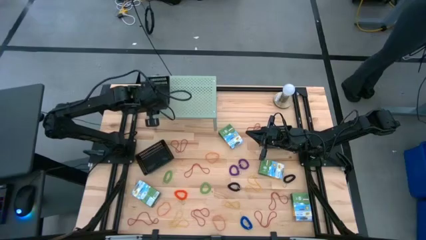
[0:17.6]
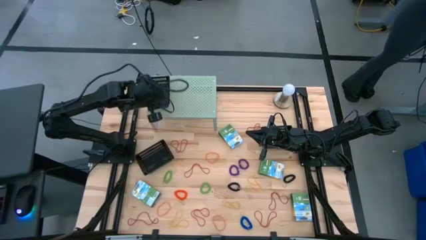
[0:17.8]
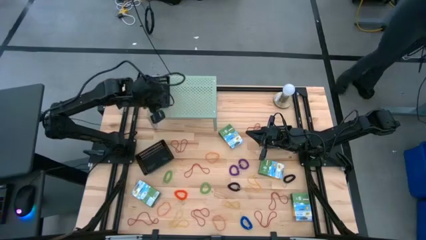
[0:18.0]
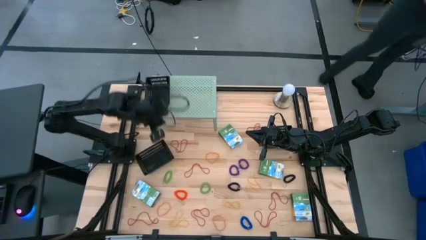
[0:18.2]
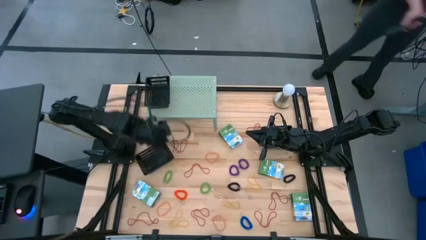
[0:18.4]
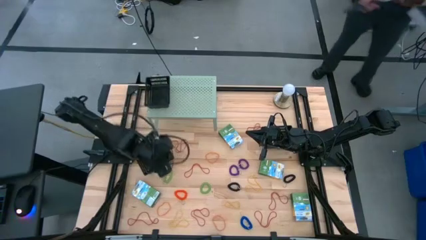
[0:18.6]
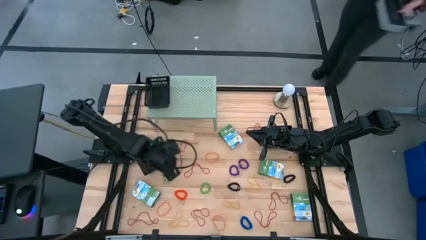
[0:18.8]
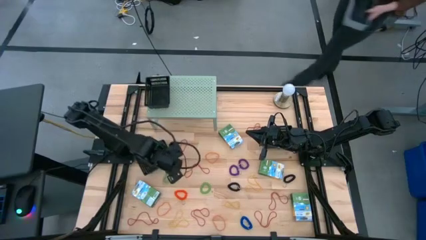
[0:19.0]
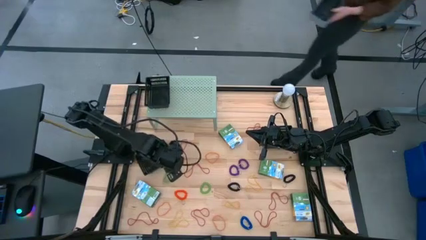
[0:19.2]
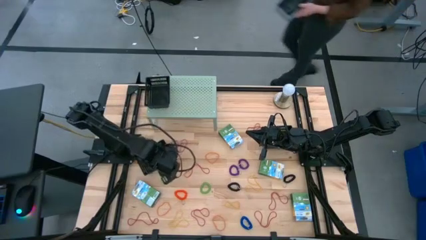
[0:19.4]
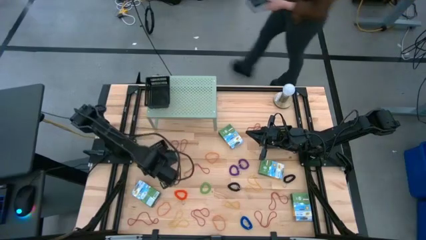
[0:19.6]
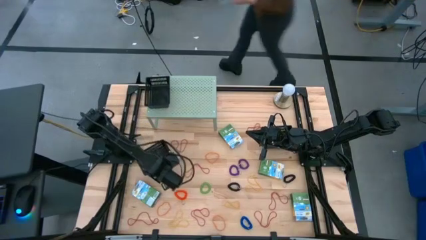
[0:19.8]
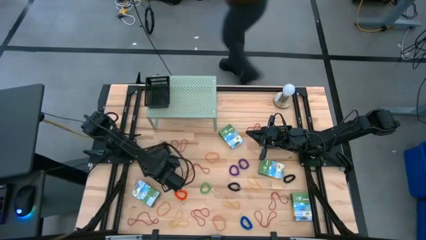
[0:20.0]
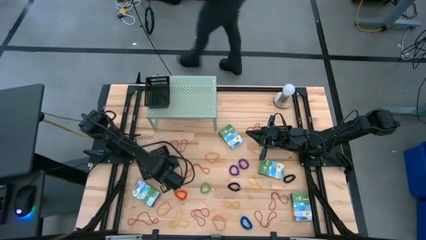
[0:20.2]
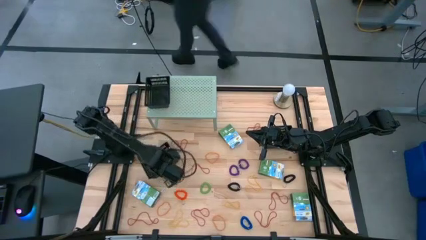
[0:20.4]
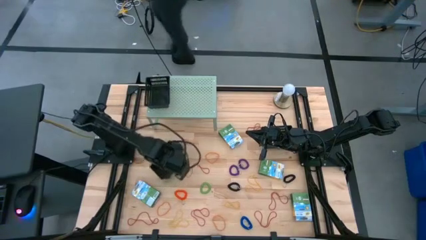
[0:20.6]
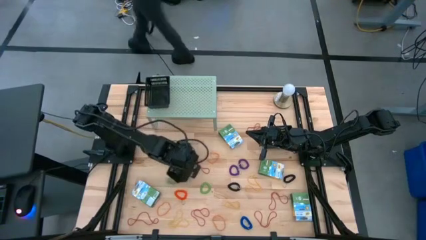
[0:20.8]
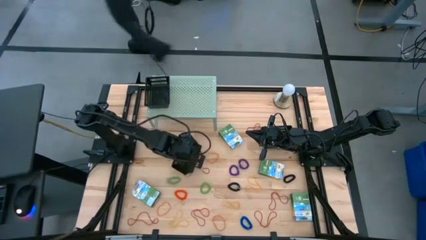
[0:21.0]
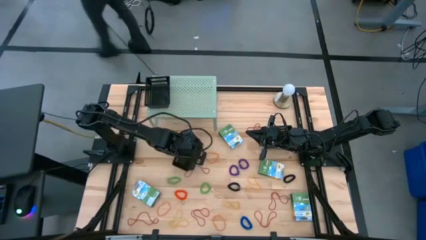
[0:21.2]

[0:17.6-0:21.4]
Task: Pick & Place Office Desk Supplies
Put the black bin on the shelf

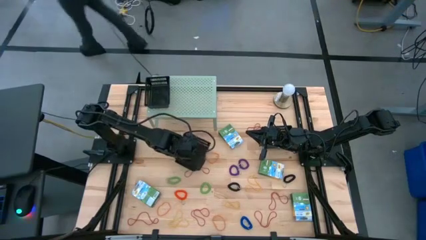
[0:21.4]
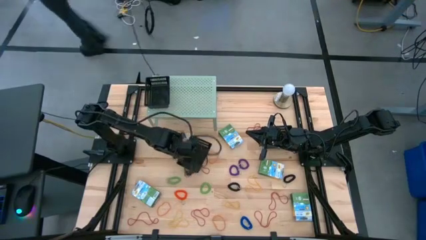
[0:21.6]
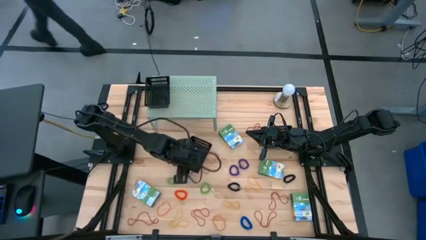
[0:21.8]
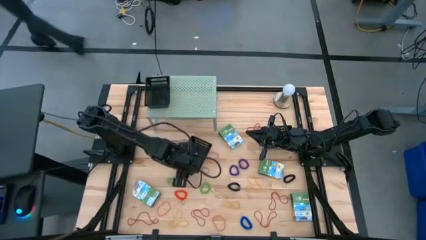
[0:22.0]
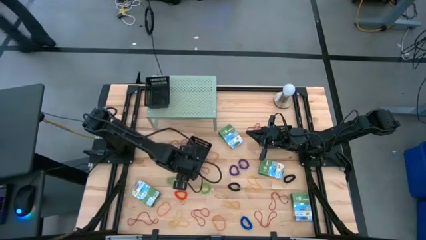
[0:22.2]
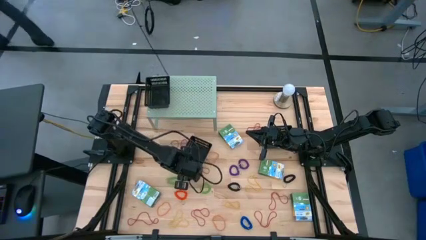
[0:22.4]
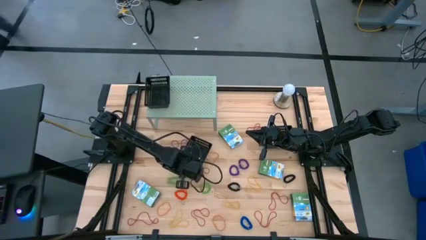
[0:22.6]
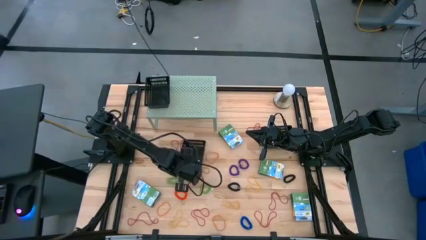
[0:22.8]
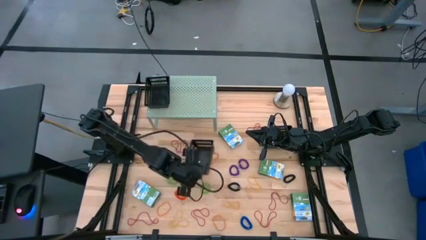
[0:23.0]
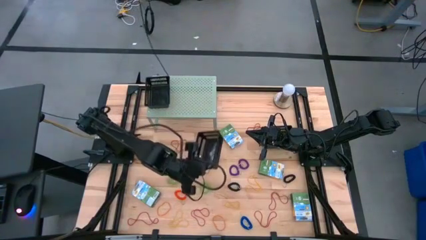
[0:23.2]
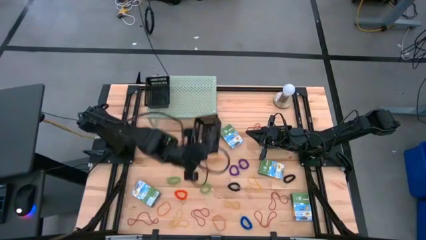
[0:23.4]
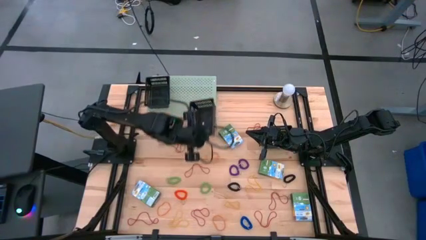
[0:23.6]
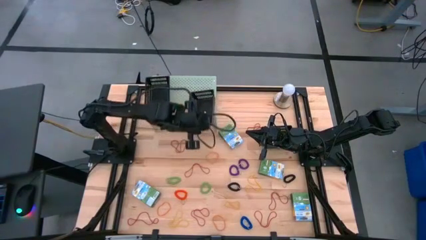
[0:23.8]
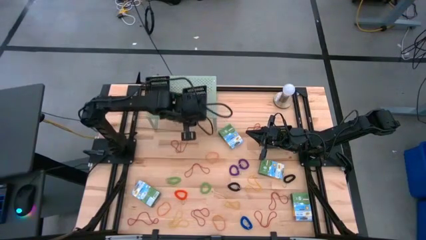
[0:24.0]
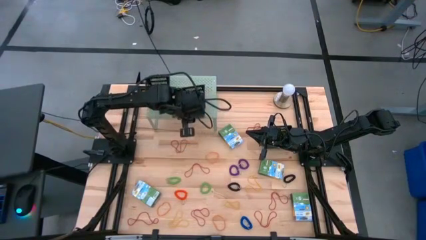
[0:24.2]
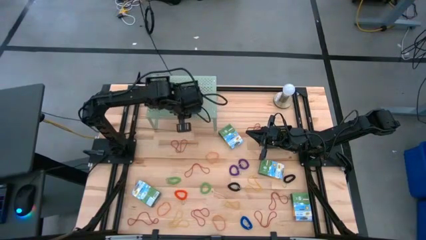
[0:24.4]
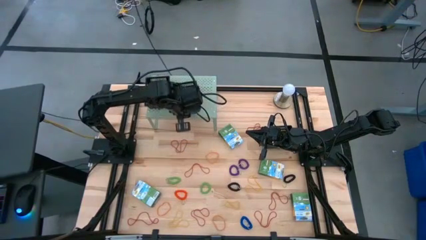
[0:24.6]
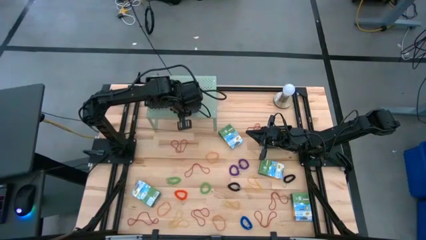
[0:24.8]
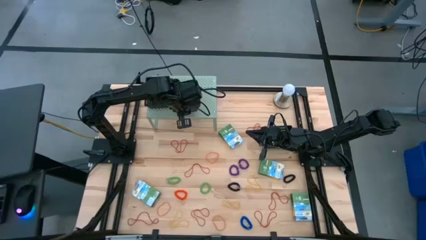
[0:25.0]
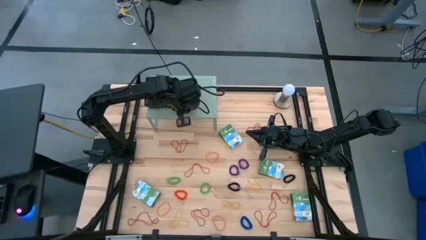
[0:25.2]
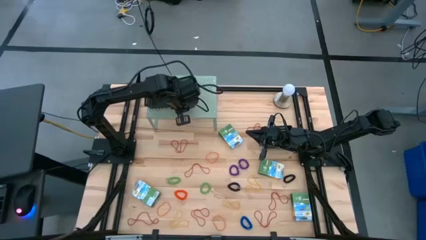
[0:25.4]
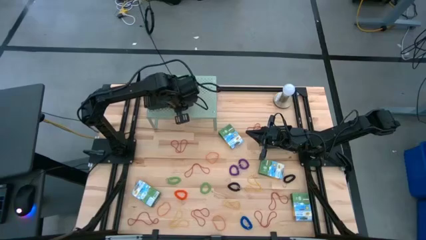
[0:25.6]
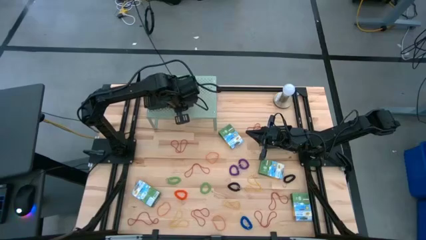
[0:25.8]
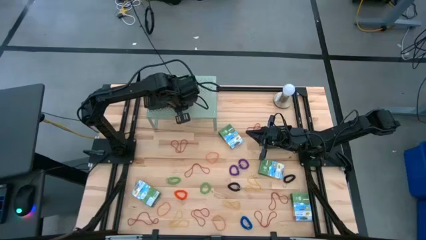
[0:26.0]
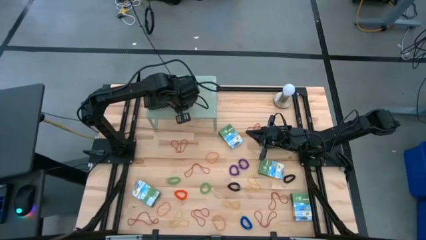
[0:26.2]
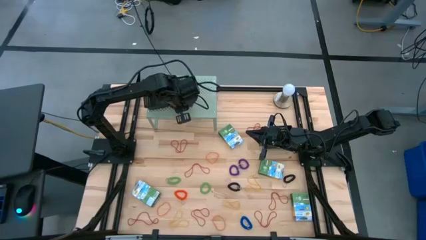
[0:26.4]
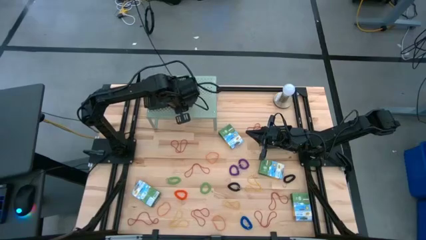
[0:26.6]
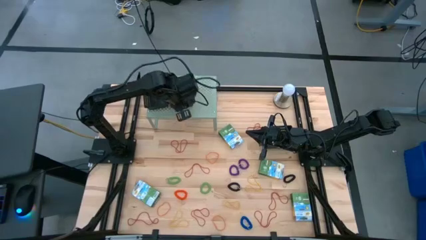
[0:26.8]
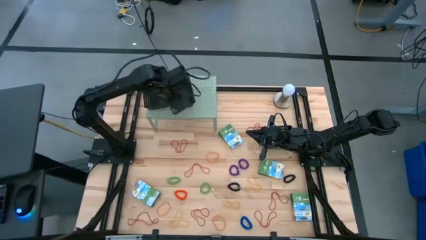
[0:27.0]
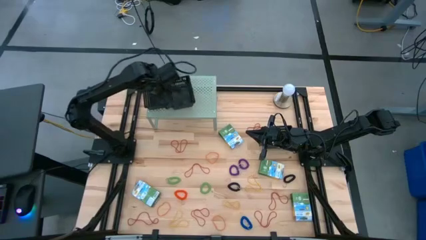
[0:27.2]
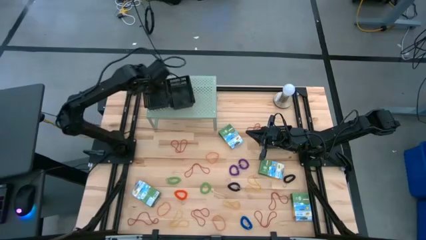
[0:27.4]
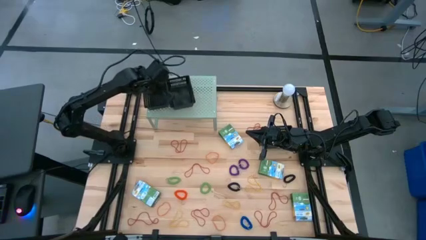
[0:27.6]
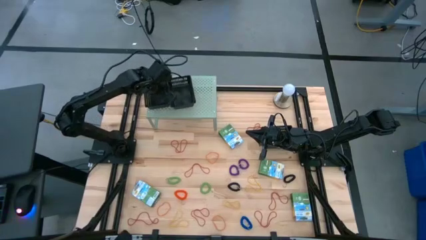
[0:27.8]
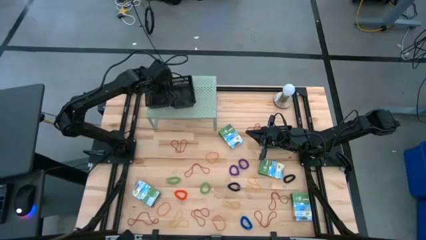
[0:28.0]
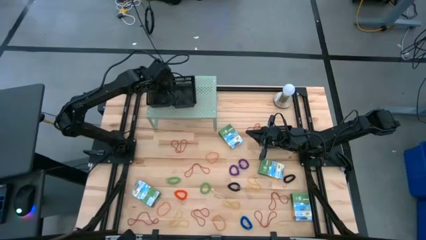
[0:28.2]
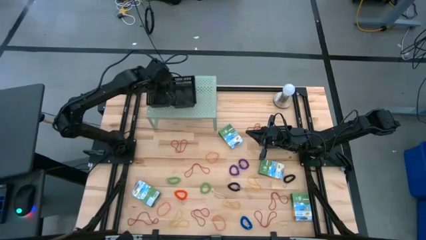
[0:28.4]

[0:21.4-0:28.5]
Put the black bin on the shelf

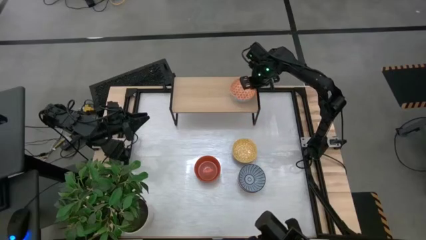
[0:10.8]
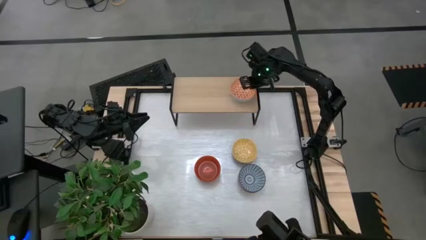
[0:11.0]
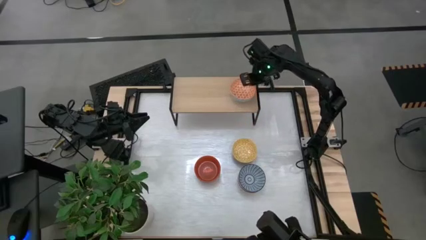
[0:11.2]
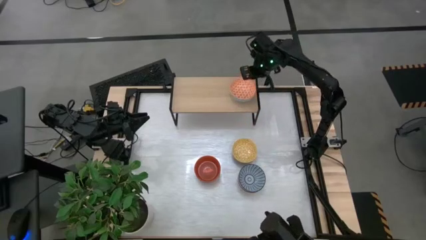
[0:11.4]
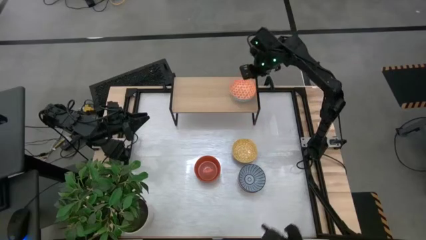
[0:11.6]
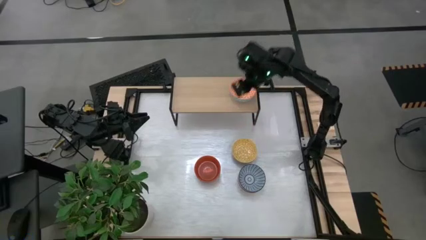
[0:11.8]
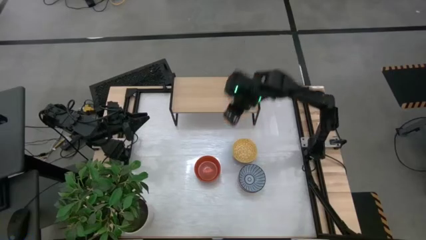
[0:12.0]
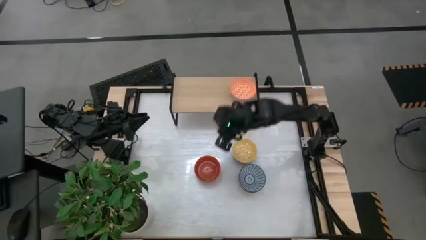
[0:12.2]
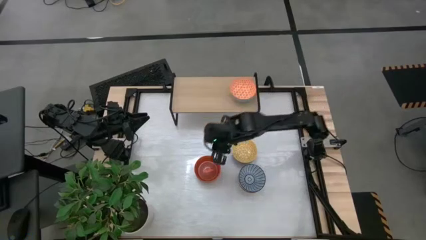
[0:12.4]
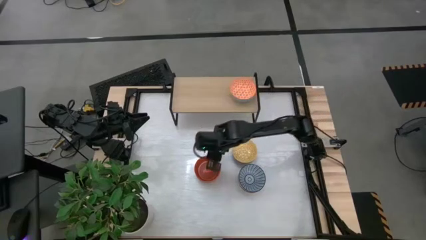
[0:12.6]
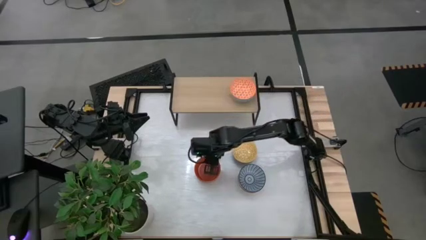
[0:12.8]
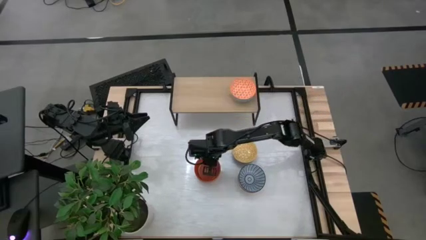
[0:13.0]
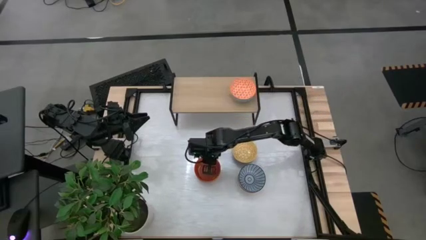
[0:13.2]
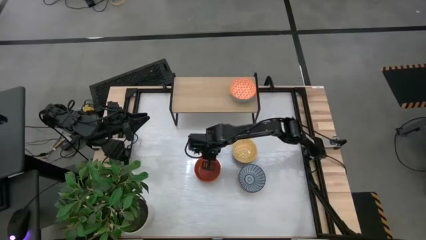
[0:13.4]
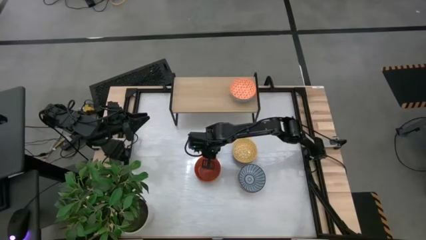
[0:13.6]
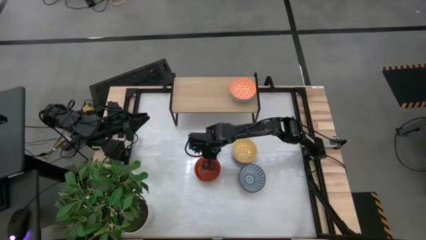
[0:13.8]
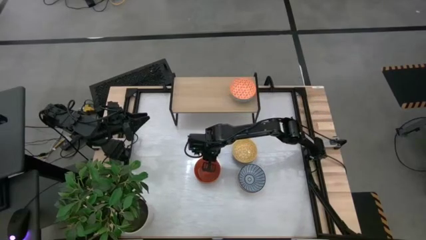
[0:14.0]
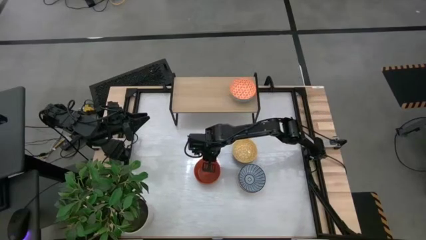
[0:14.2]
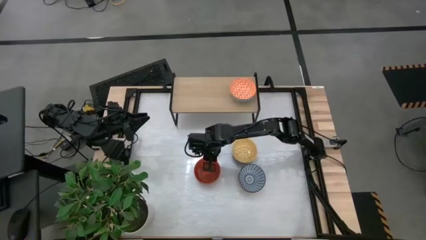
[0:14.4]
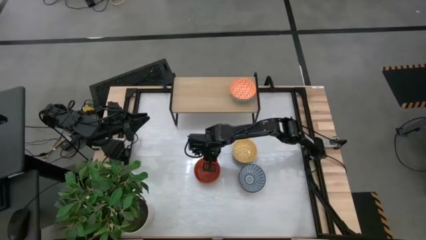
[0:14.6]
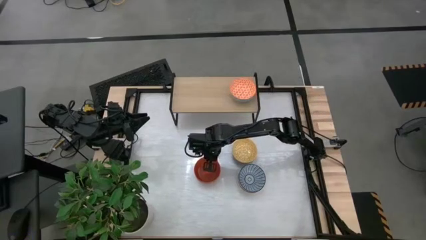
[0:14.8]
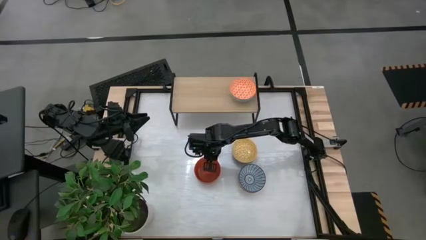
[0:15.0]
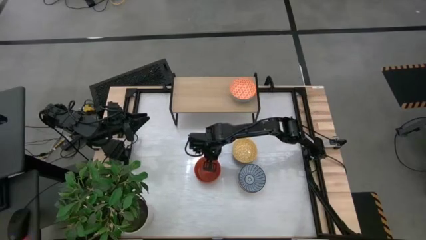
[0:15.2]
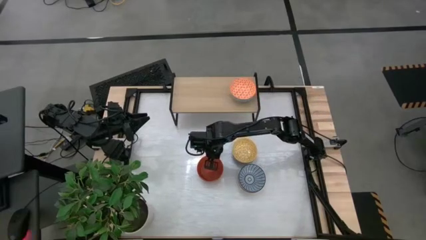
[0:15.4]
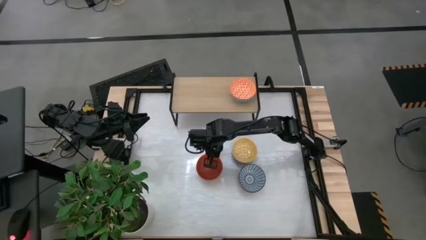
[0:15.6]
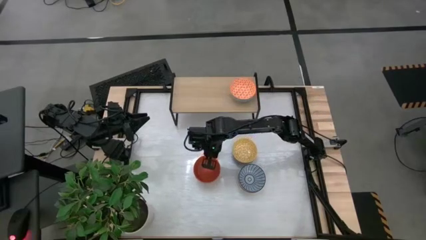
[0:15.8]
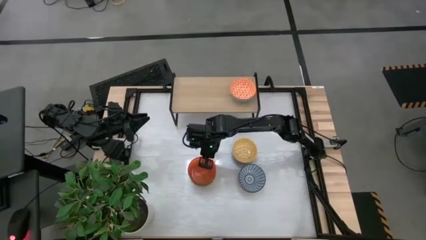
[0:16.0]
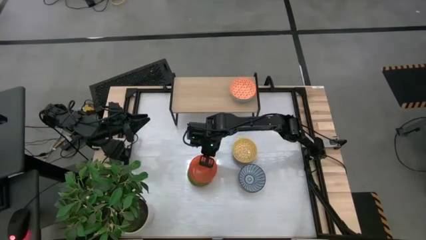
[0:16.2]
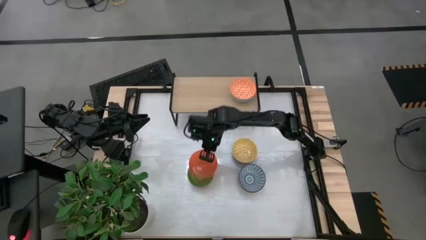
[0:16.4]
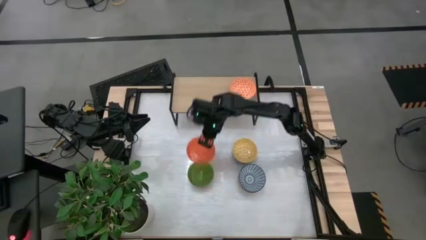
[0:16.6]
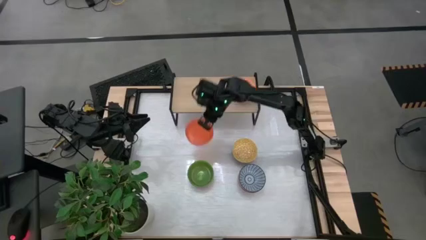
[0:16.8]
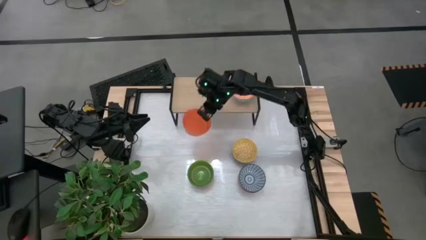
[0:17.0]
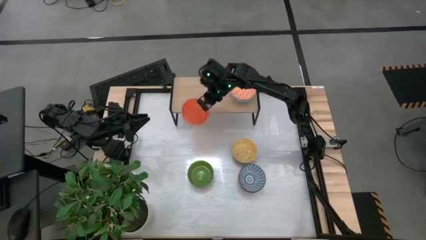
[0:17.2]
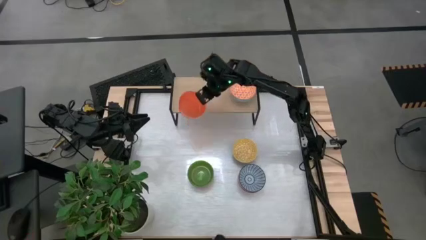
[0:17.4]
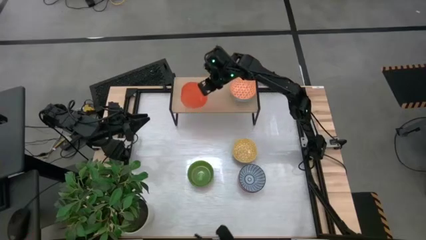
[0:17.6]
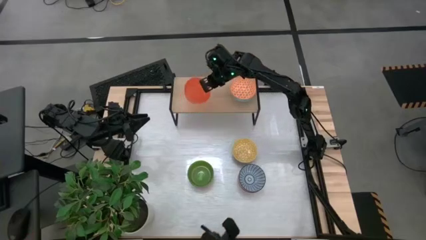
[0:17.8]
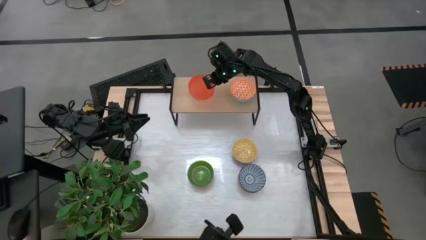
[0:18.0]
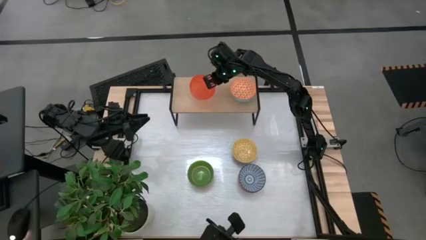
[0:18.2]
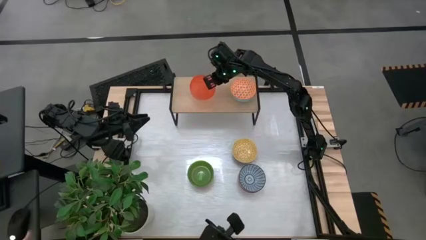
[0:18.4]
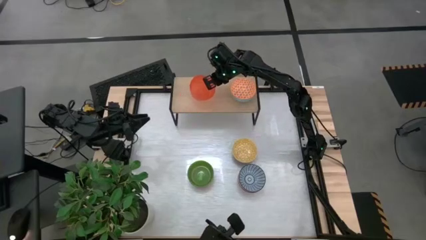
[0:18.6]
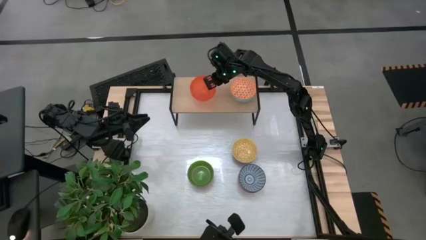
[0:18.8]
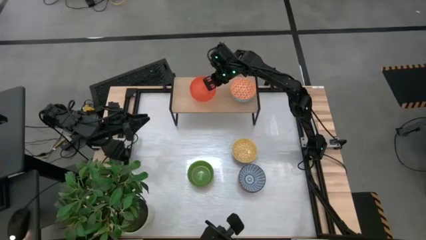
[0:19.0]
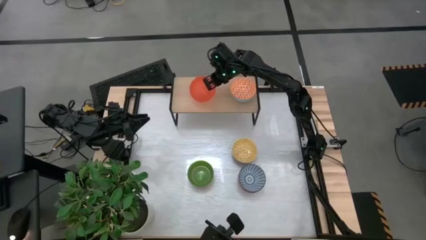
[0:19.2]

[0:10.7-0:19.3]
Task: Place and stack bowls onto a shelf
Put the orange bowl on the shelf
